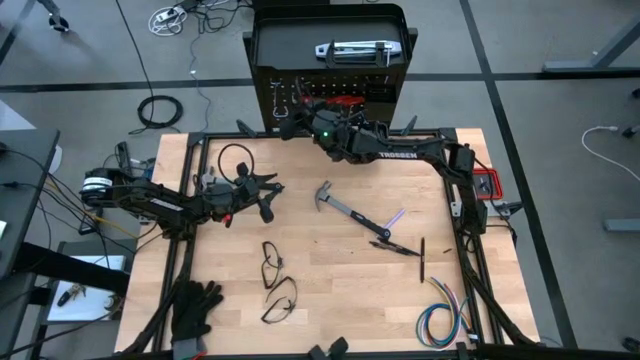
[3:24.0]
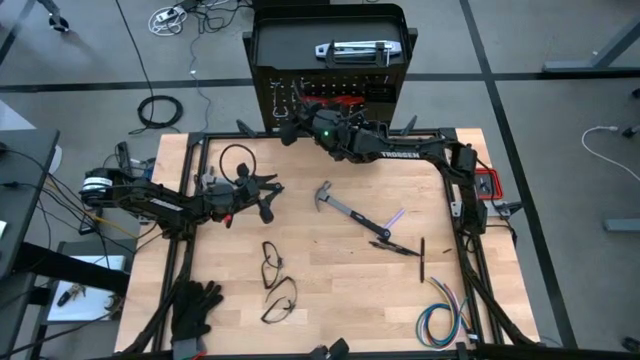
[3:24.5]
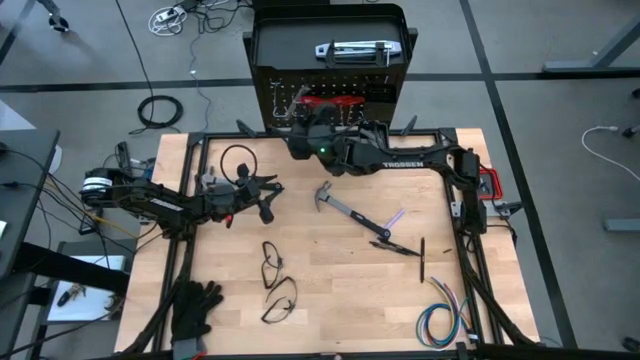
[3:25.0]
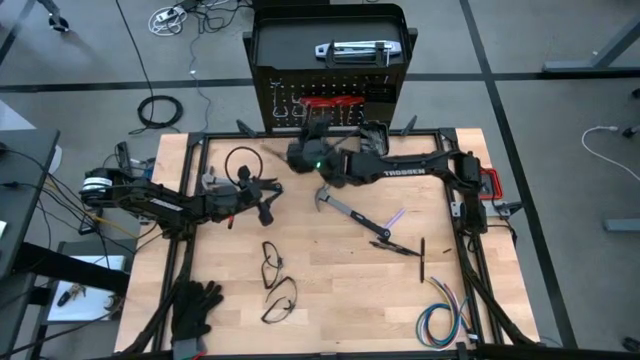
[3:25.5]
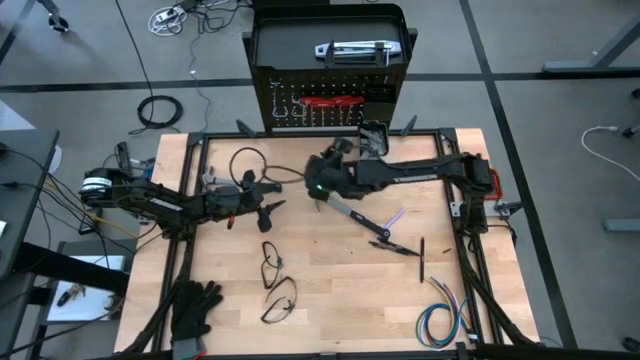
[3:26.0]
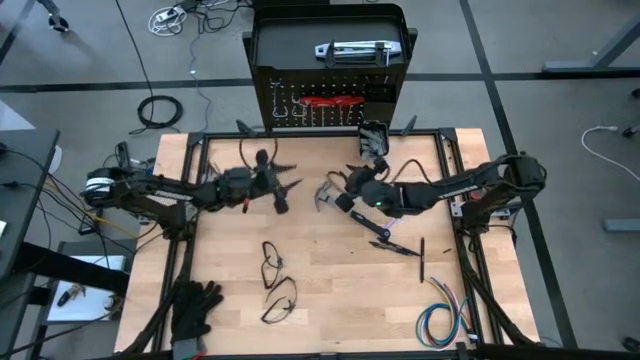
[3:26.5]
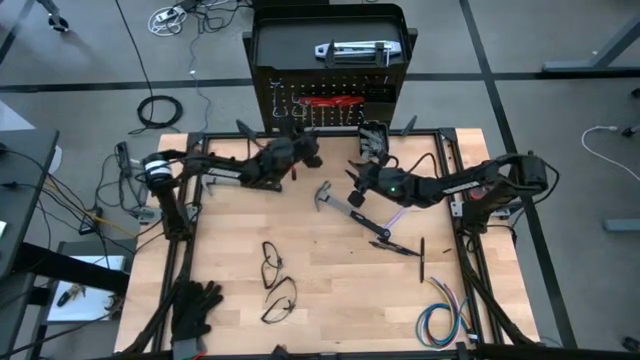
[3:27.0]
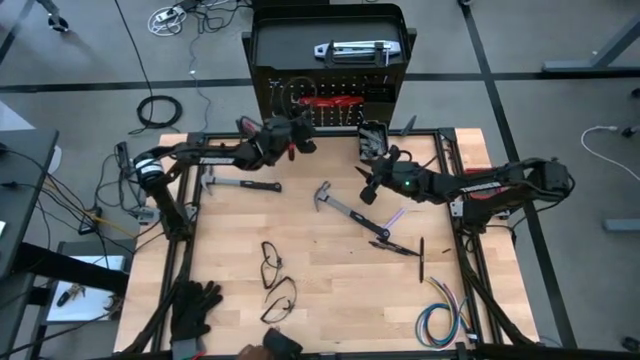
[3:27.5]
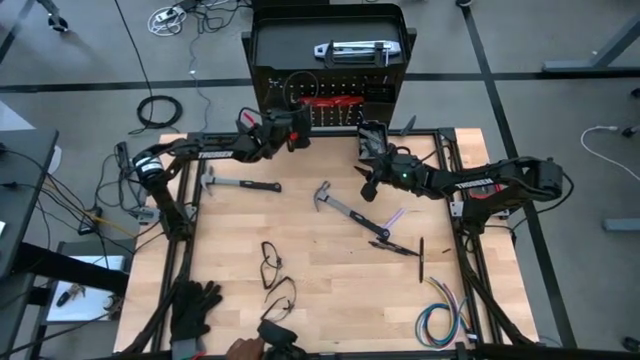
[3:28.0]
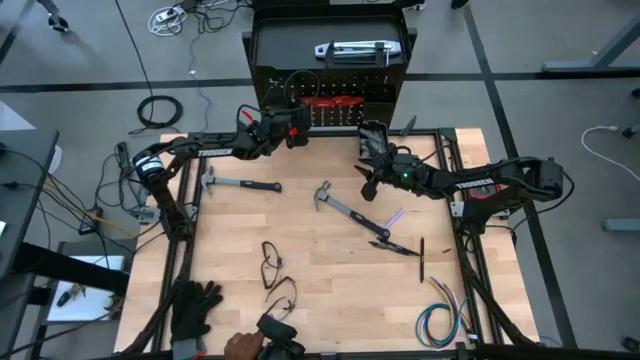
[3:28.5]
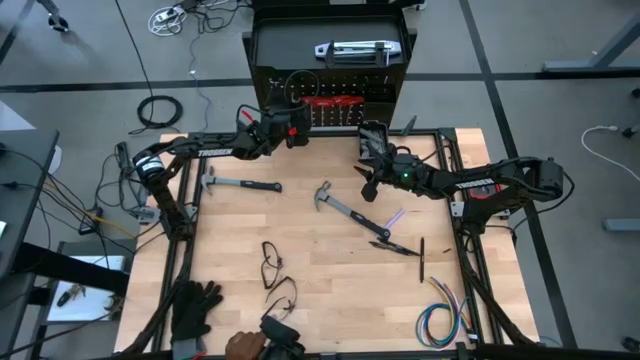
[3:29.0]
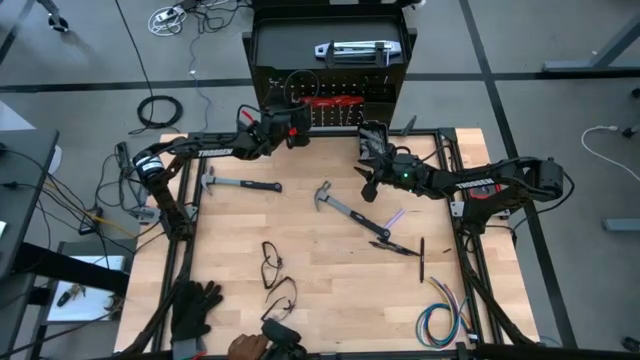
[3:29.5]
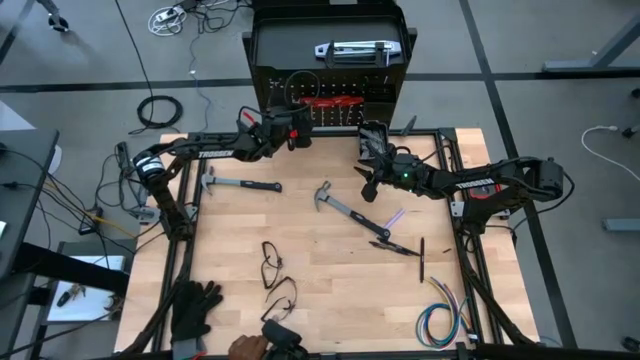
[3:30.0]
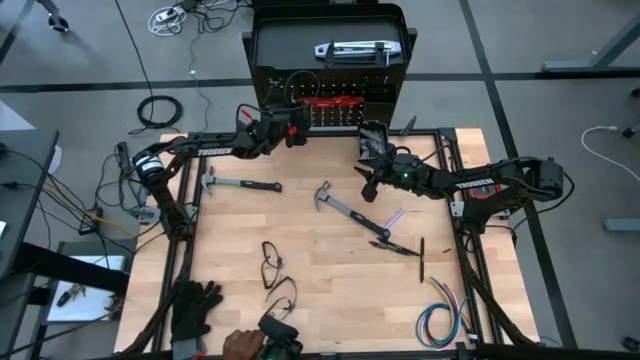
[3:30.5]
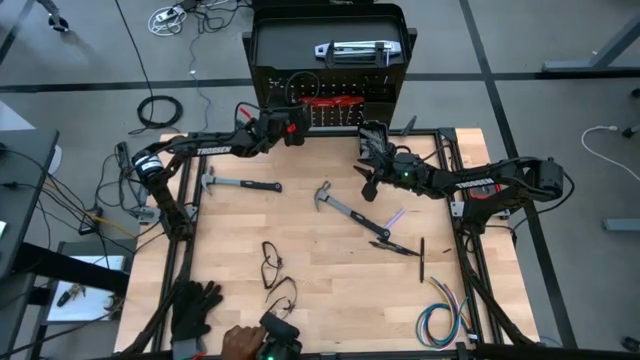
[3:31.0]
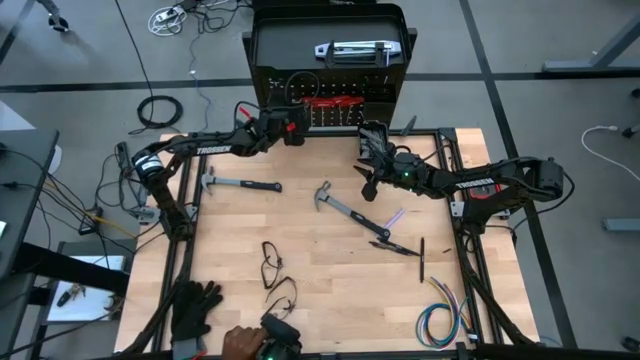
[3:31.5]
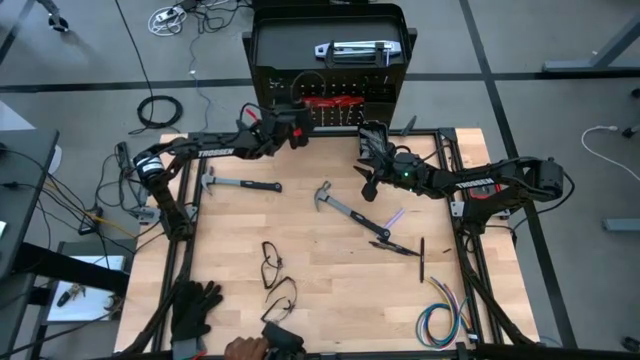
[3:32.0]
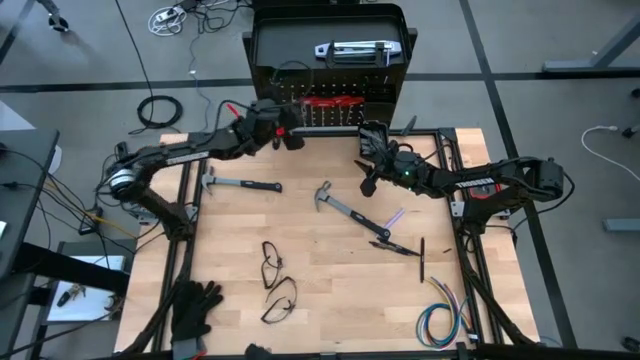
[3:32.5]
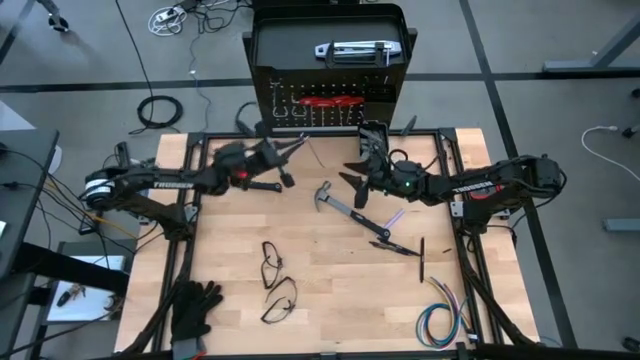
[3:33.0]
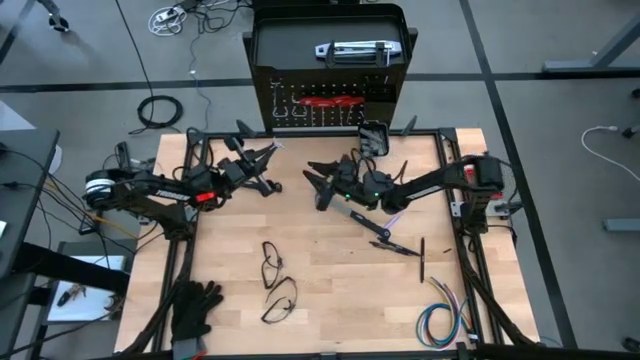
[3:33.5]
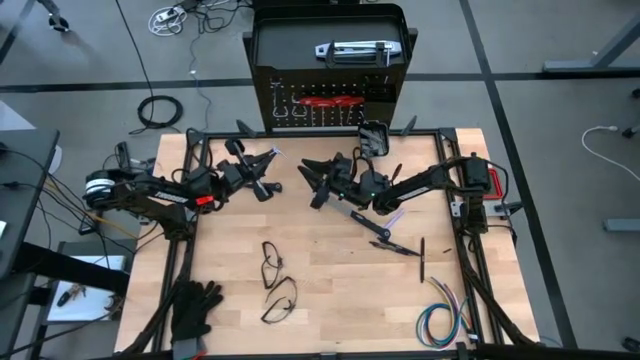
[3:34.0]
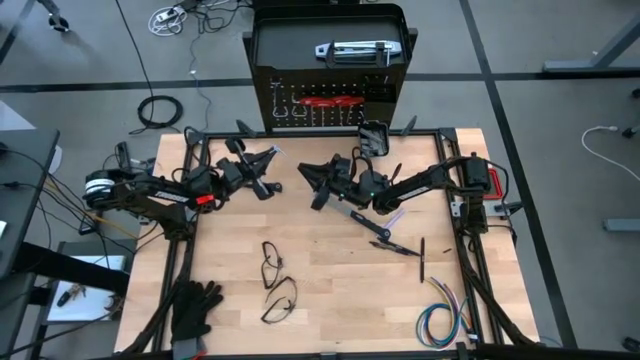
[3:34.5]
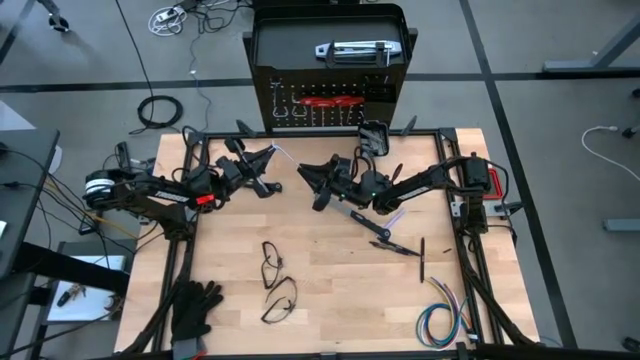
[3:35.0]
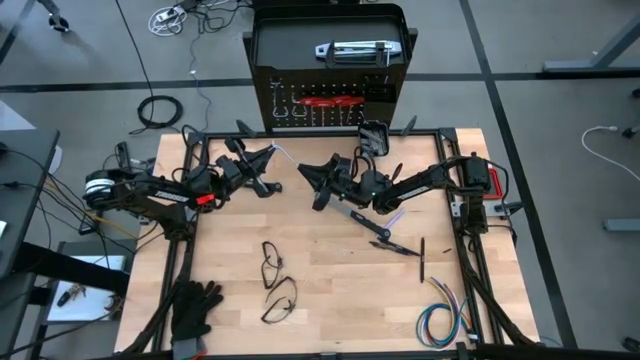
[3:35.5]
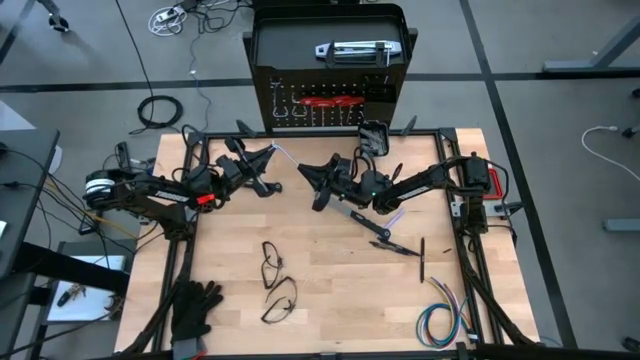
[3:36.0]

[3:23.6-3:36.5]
Task: Hang tools onto peg board
Move the hook from bottom to top

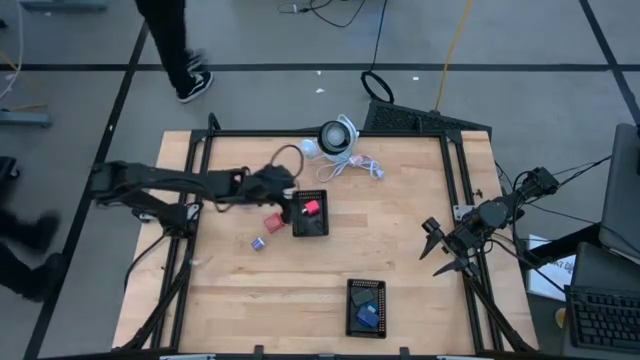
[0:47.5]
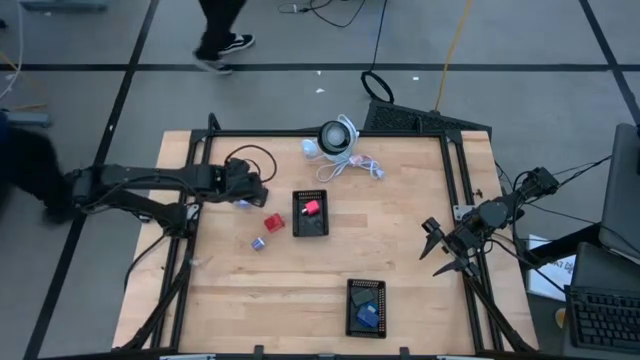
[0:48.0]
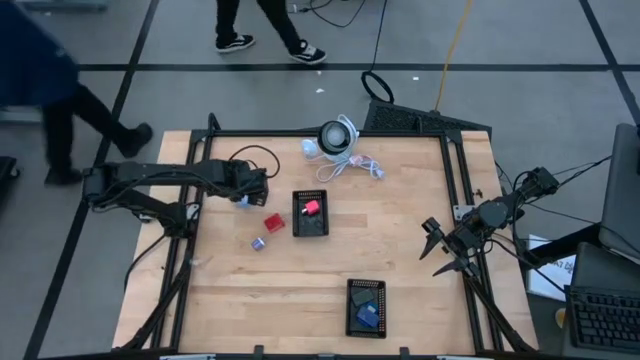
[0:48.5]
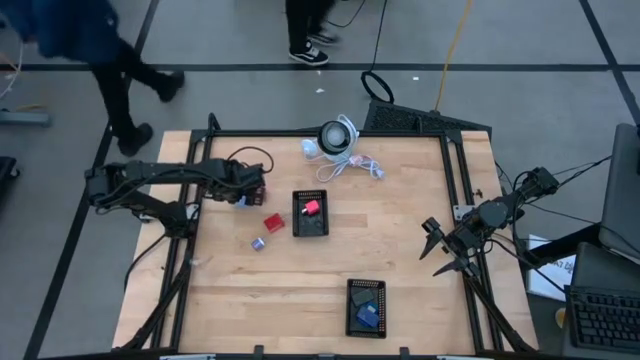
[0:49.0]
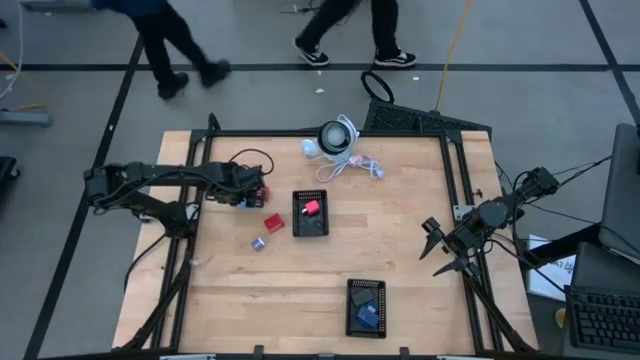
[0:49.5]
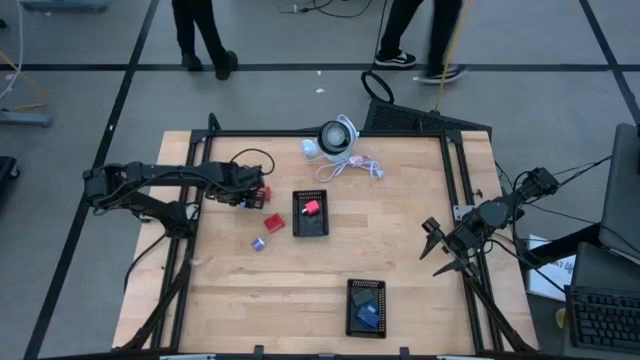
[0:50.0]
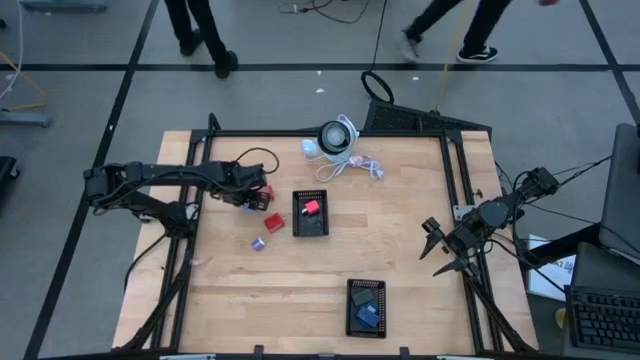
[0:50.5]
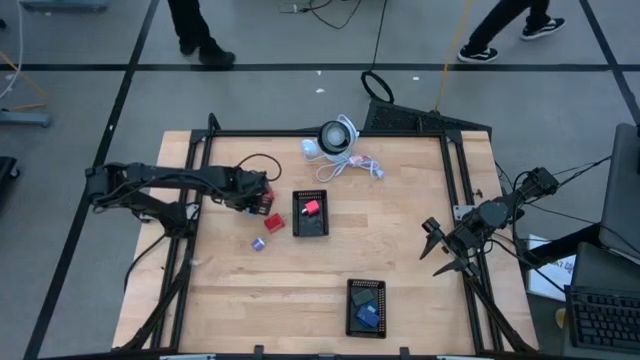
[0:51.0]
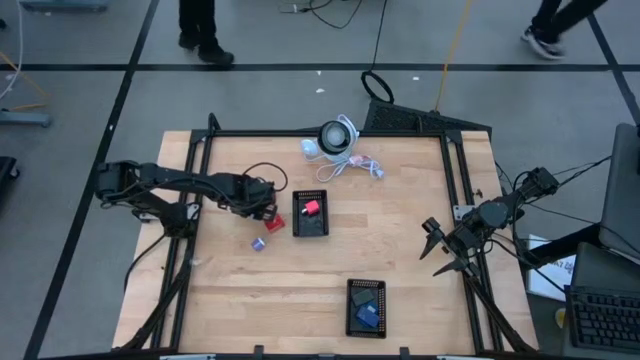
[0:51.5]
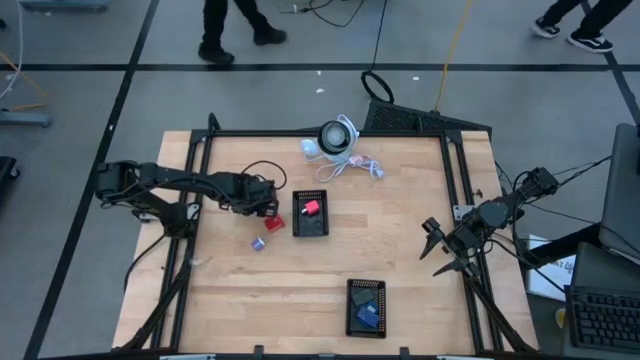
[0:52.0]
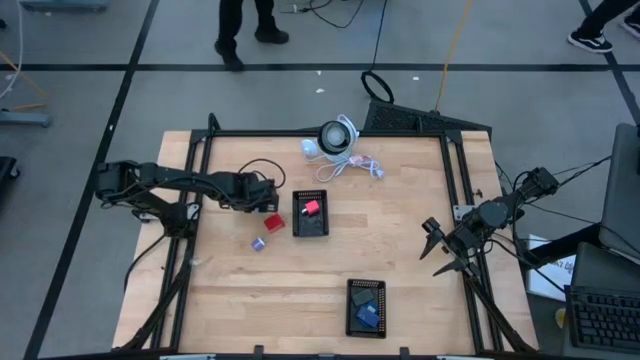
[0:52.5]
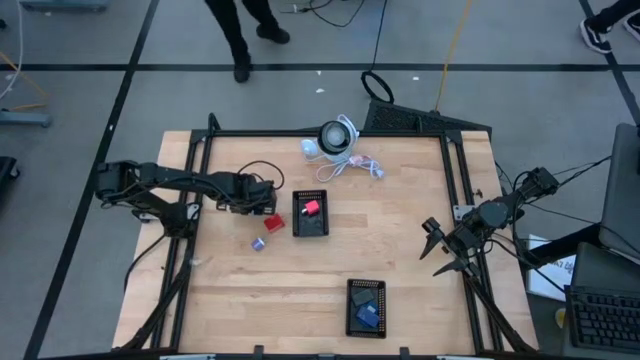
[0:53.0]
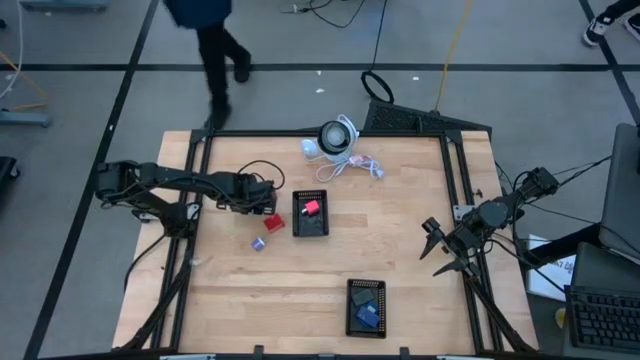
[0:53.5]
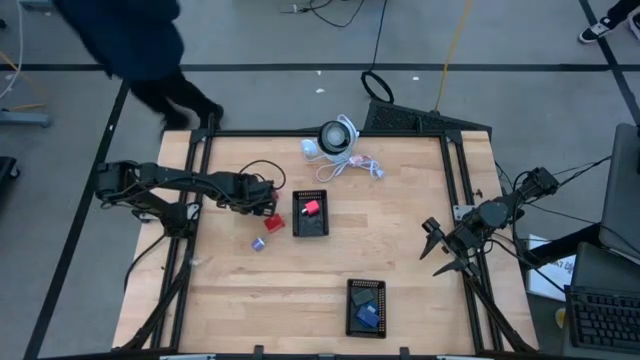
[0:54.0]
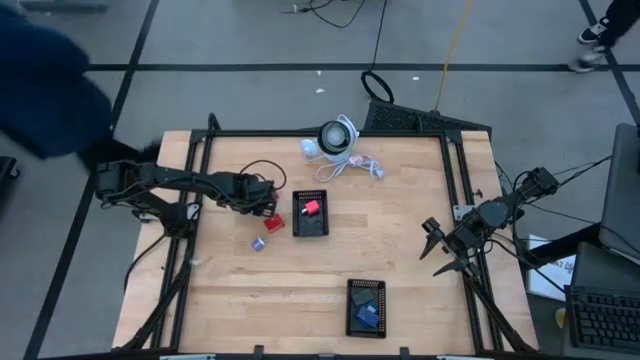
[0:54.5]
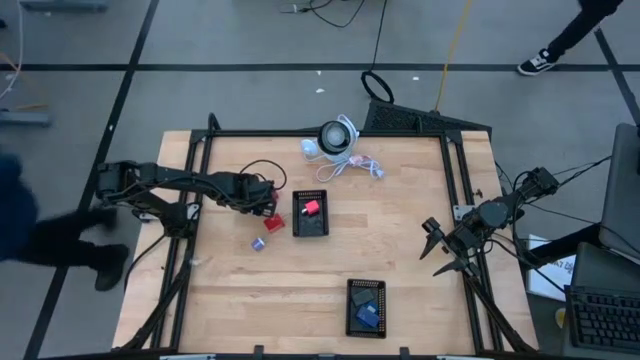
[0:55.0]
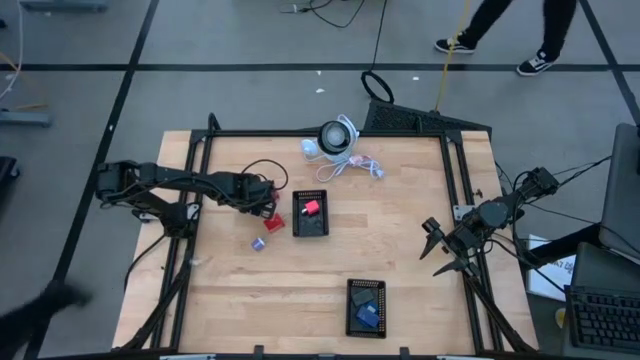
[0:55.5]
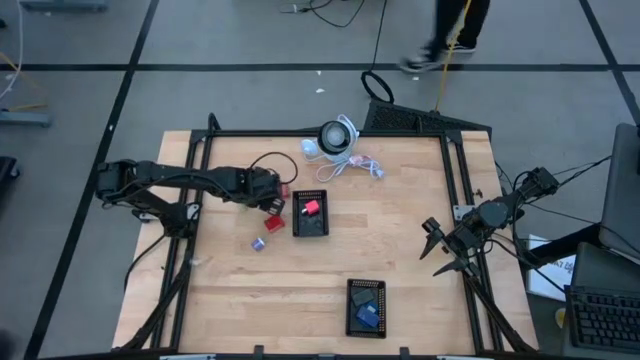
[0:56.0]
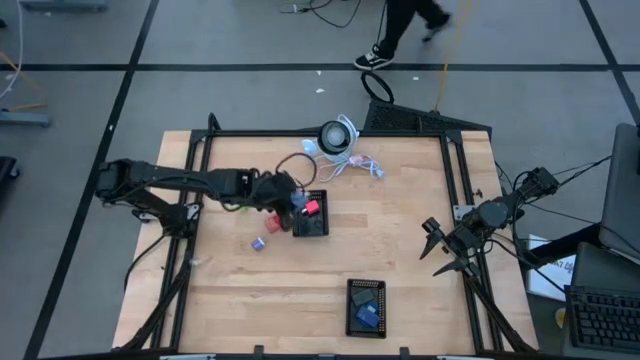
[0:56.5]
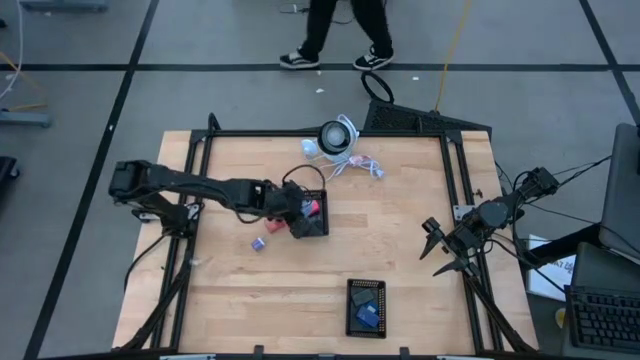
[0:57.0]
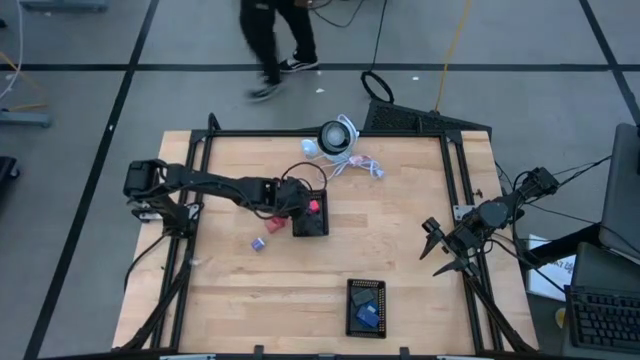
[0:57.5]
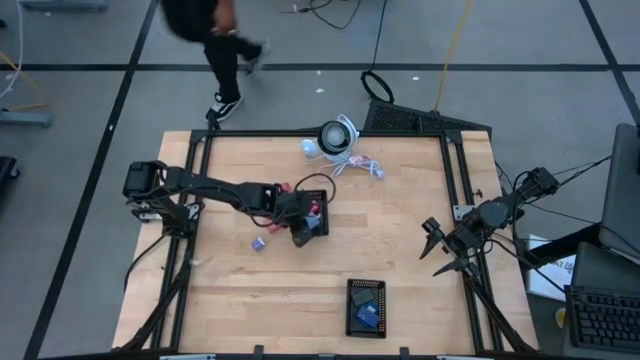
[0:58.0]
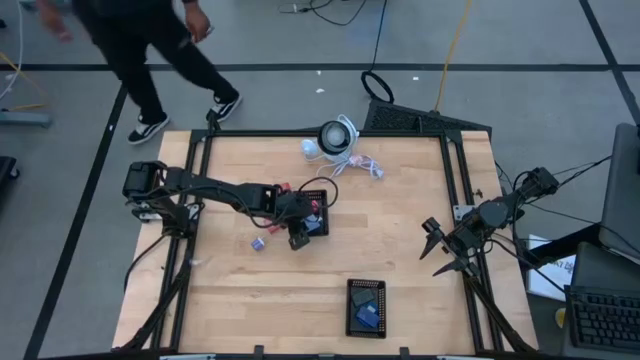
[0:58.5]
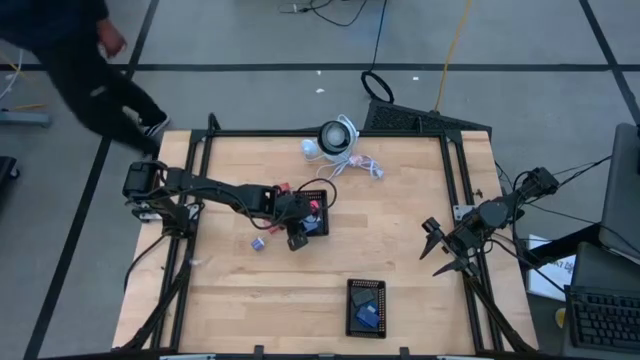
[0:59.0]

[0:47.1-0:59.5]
Task: Pick & Place Office items
Put the blue charger into the top black basket
